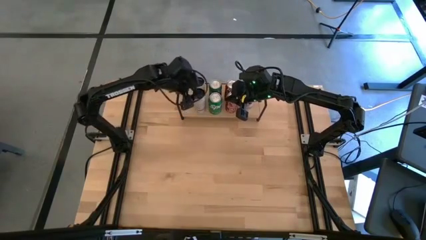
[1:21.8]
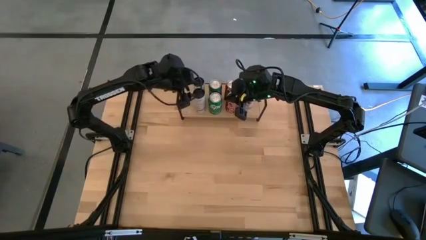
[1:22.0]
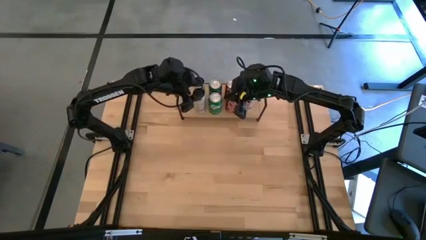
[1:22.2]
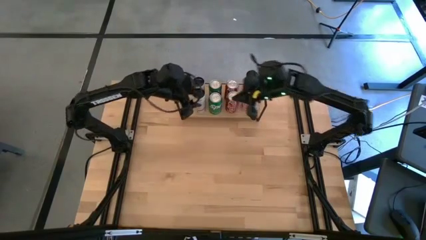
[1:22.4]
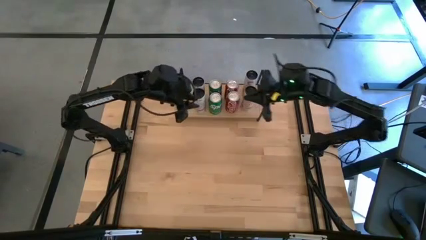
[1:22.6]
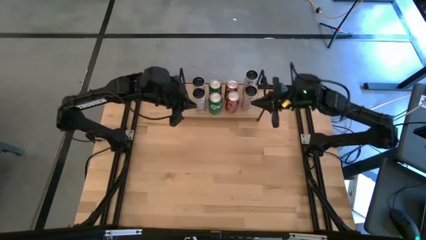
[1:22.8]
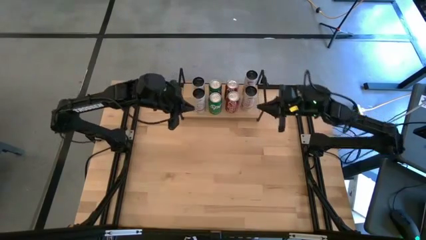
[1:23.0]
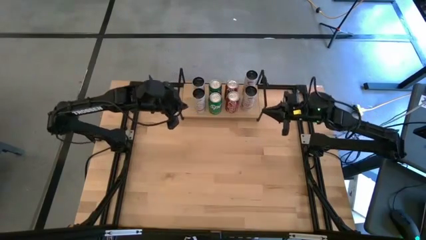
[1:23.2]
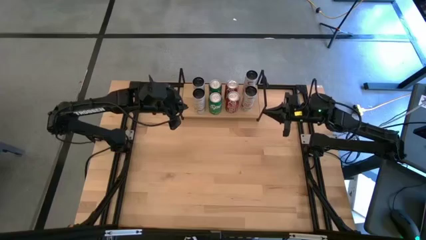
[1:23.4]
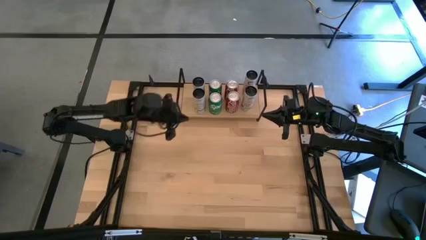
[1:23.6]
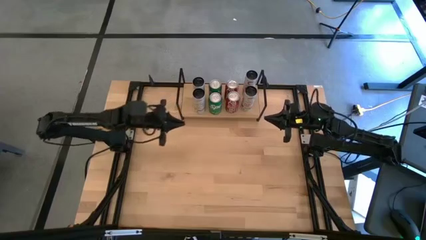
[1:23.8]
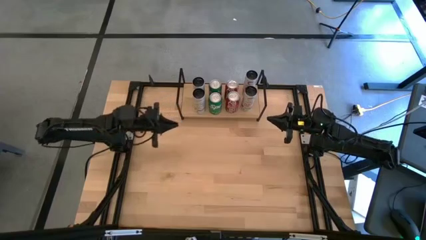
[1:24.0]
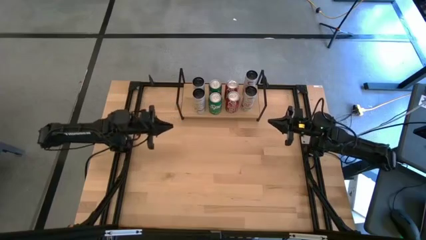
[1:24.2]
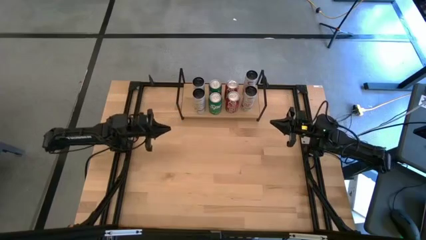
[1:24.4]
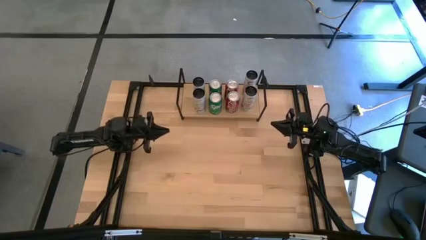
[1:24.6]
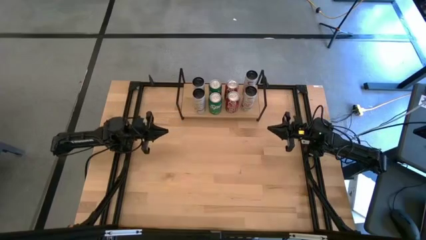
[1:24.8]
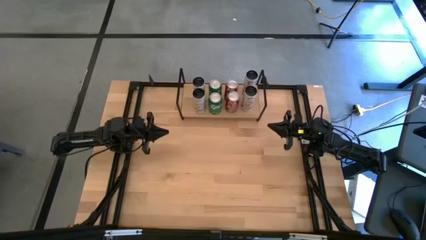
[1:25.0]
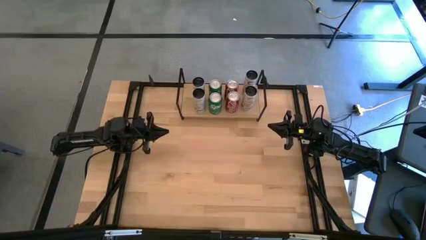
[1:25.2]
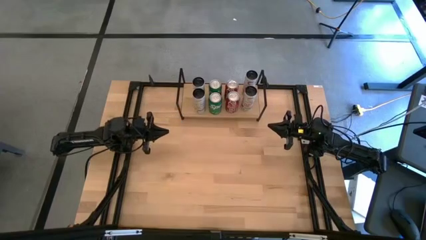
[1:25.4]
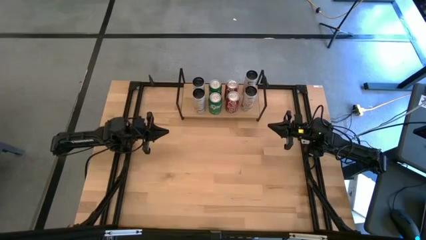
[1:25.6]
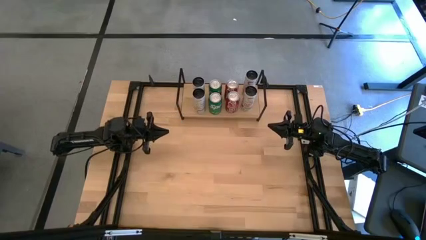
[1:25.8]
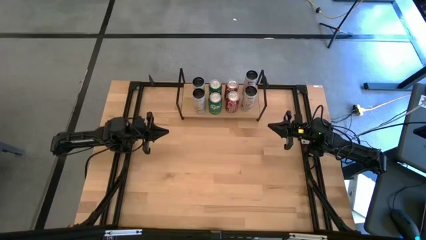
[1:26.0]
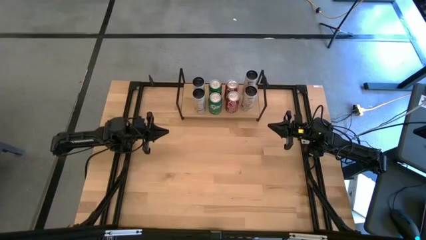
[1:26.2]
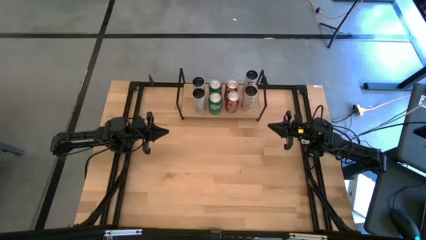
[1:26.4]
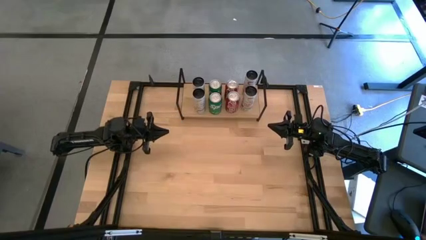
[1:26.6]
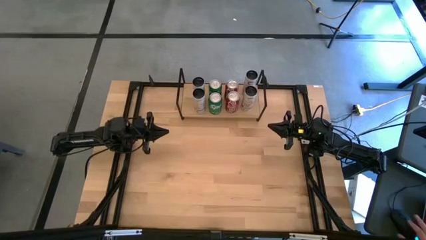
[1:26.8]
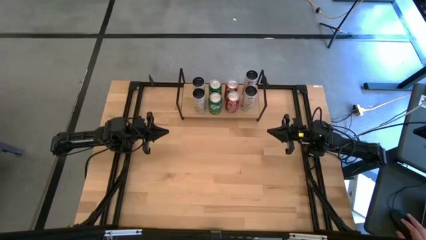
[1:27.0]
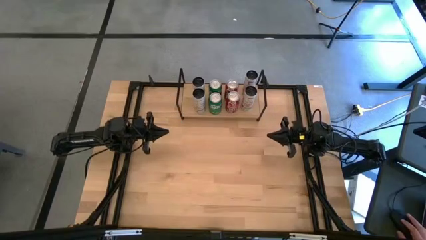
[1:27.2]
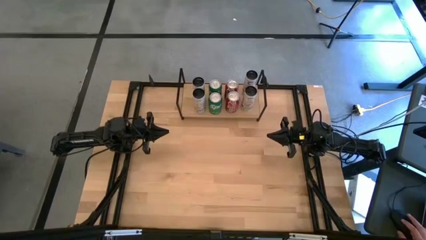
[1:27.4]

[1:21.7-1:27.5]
Task: Place canned beverage on shelf
Return to Home Position

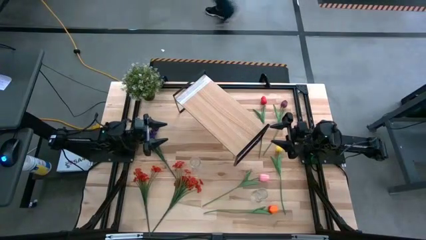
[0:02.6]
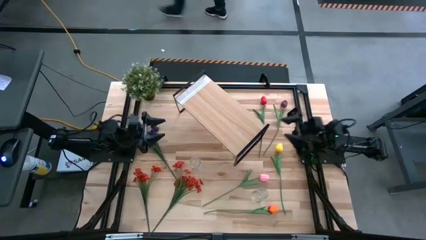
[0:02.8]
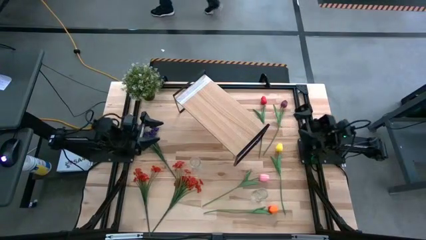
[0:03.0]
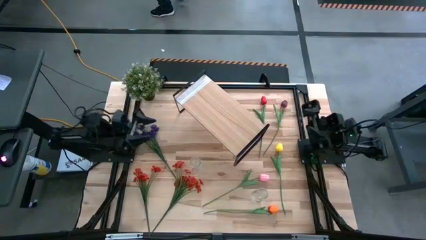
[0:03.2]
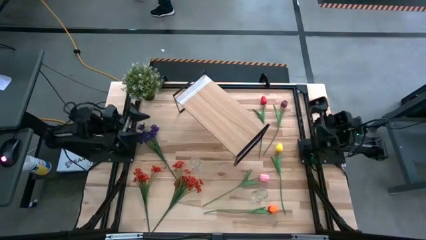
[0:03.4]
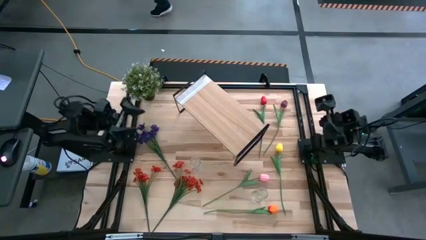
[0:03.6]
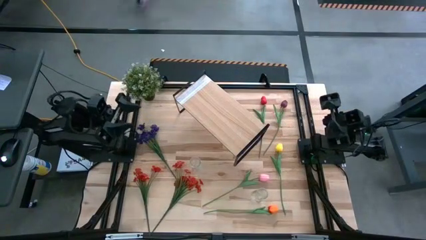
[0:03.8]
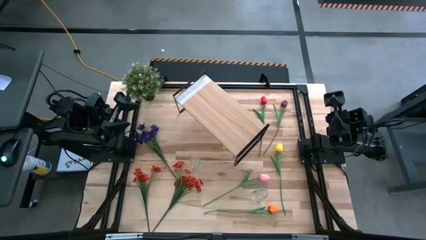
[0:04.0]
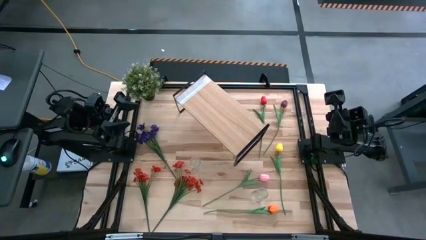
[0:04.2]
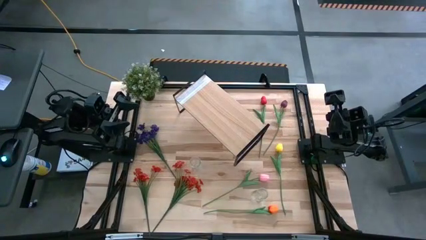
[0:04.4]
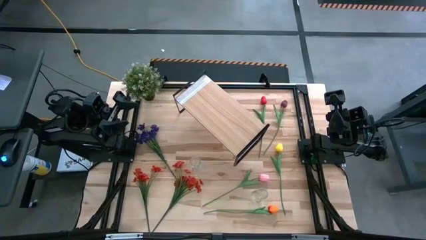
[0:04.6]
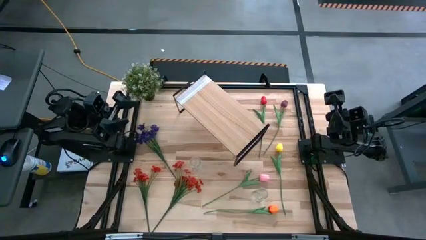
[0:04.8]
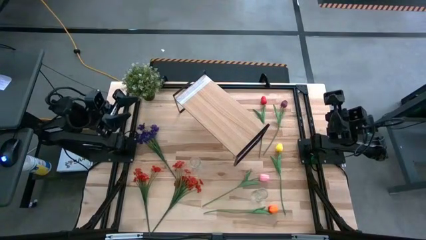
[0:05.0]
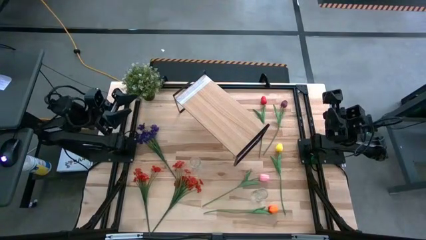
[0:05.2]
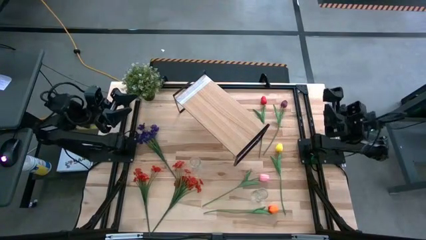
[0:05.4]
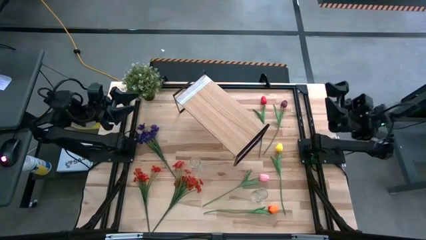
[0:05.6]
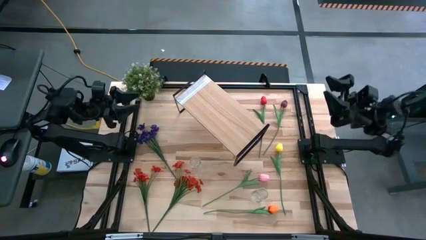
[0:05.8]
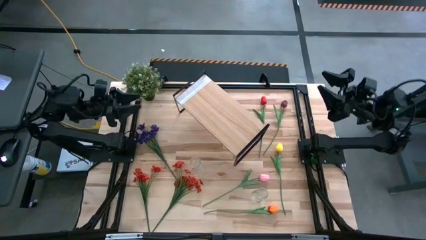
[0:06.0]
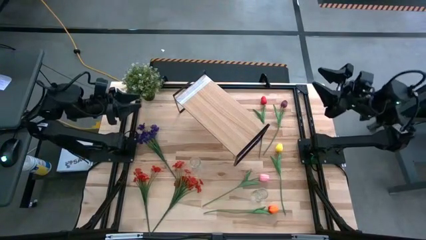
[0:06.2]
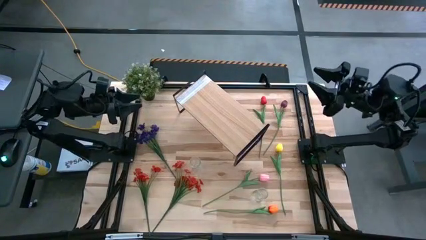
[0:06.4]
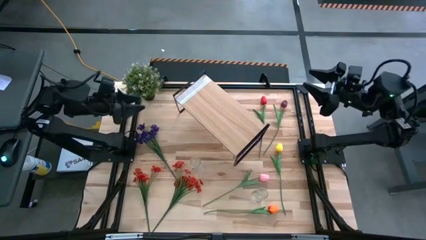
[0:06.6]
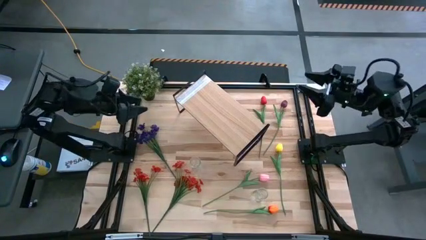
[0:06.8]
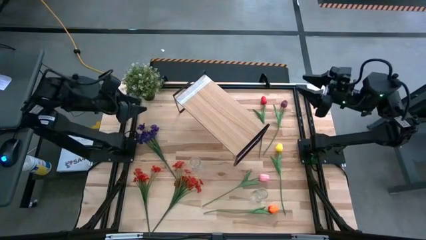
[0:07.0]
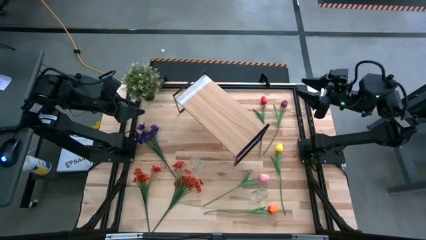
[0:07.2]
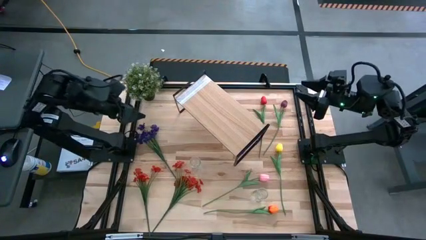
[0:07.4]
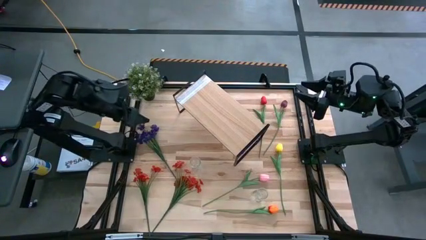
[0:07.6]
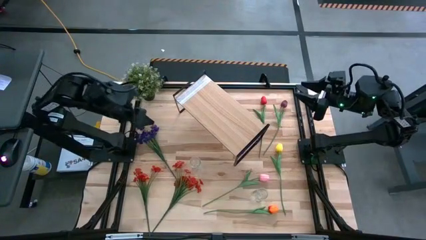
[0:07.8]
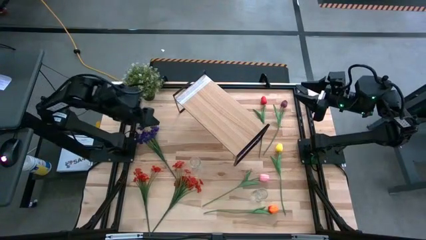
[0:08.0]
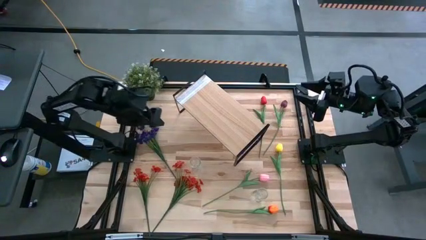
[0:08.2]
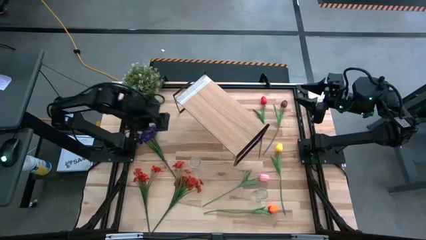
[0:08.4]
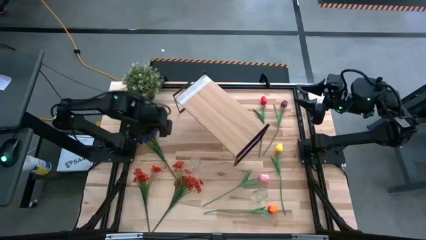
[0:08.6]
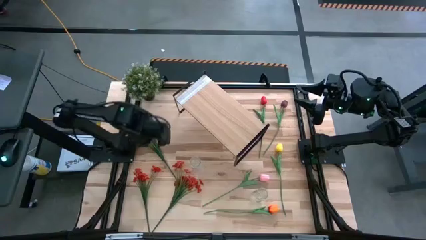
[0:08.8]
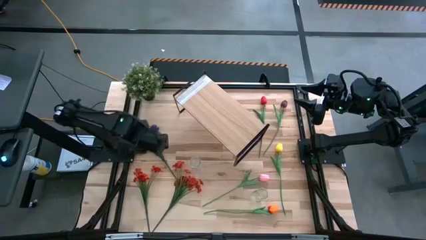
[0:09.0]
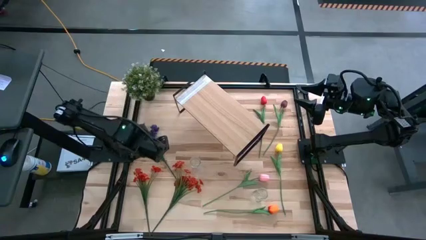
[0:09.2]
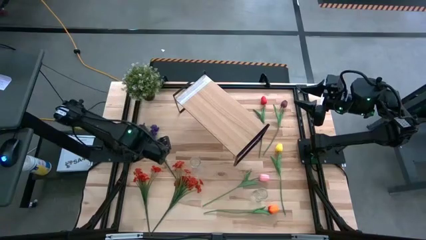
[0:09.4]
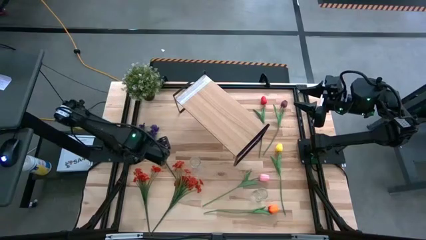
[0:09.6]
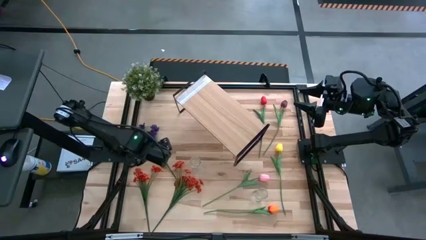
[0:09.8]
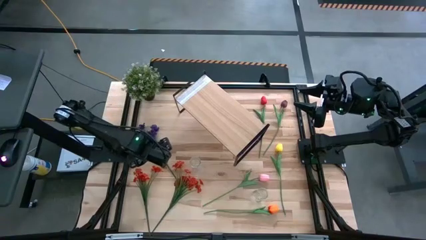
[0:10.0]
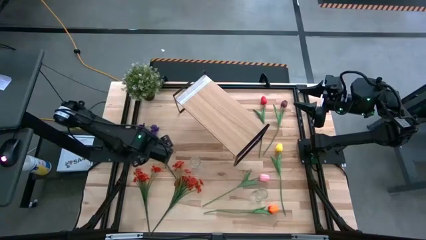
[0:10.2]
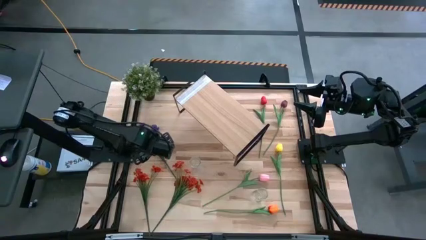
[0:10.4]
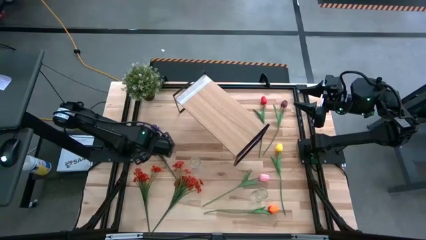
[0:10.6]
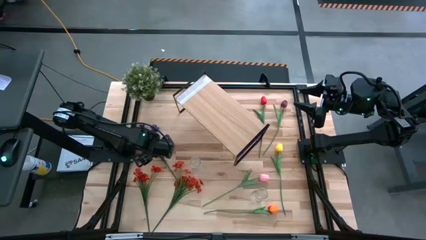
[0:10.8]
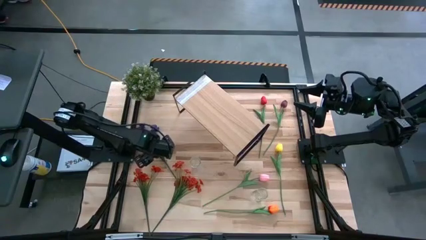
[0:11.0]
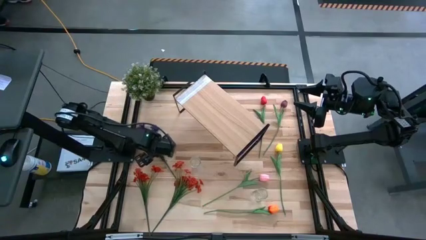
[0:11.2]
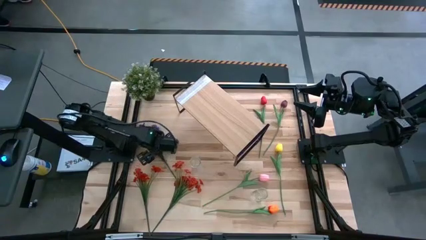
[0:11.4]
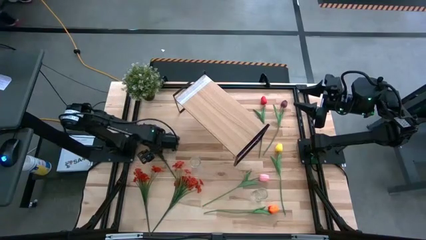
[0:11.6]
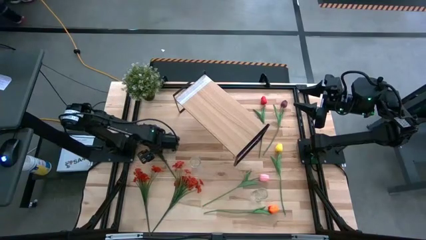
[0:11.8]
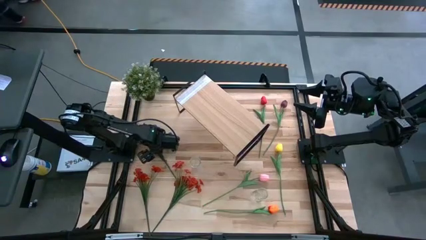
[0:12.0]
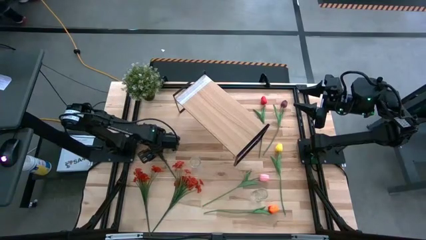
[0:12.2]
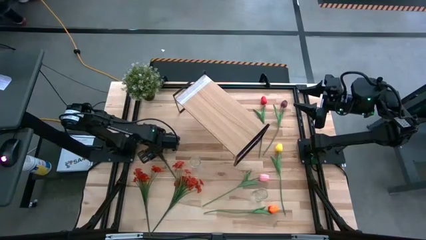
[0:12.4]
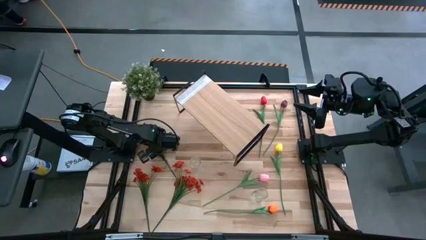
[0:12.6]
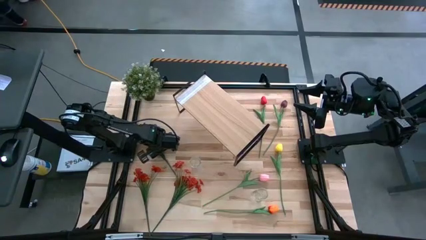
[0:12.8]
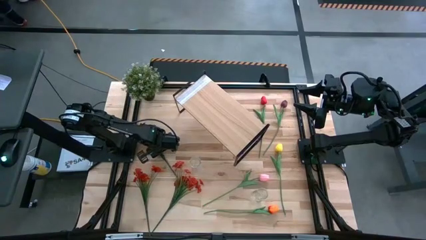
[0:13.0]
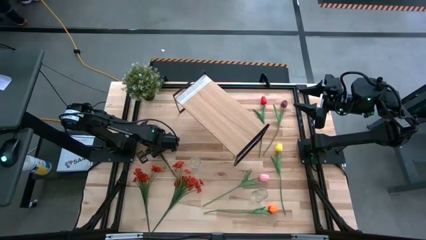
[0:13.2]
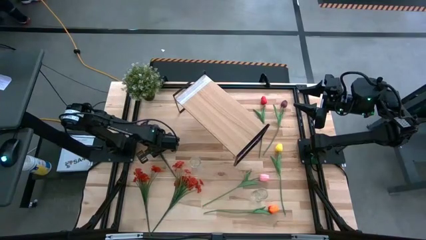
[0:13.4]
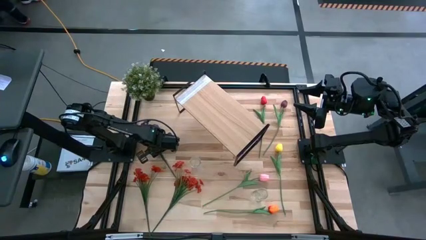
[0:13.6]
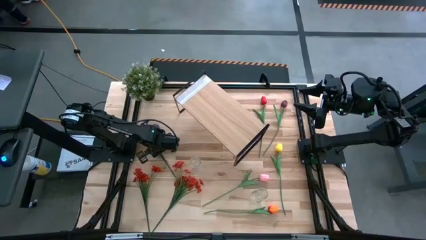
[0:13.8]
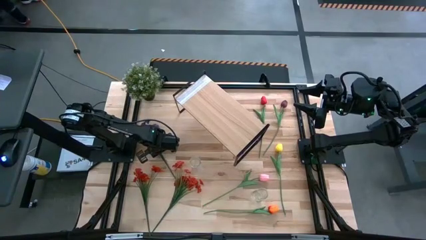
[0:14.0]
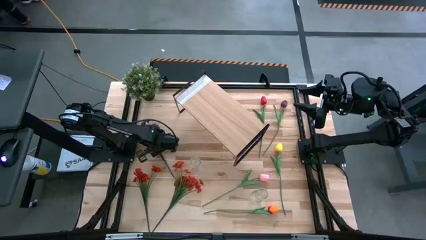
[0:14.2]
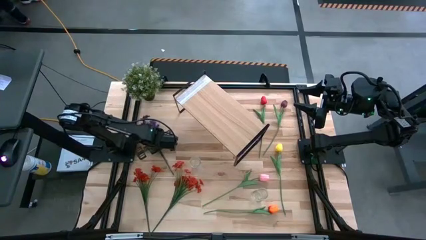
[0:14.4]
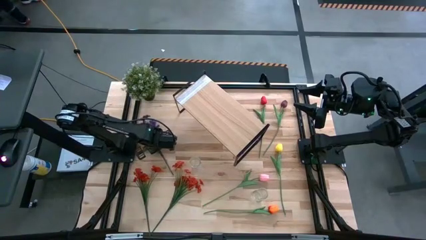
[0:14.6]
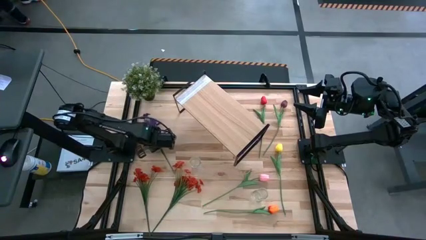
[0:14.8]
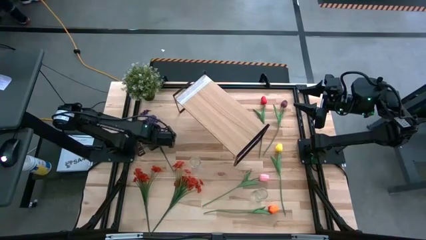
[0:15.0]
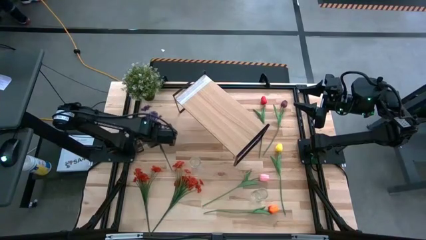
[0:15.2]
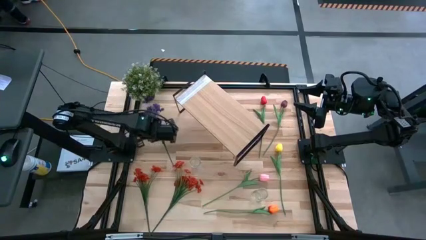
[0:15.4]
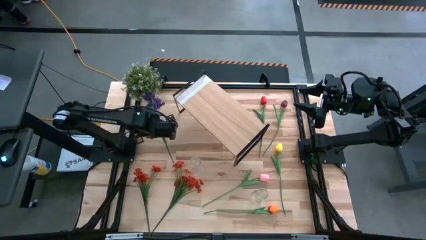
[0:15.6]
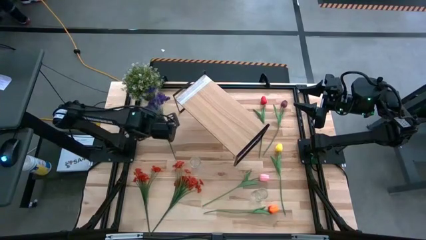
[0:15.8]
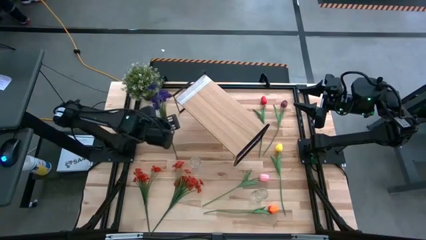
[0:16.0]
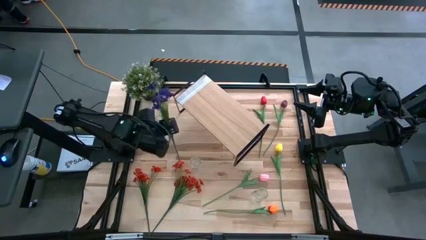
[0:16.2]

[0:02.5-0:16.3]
Task: Pick and place flowers into a vace then onto a shelf
Put the violet flower into the left transparent vase
